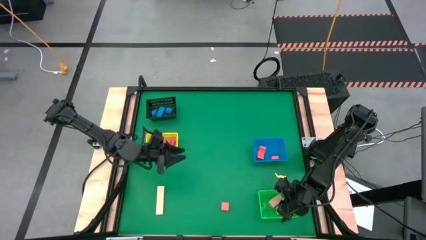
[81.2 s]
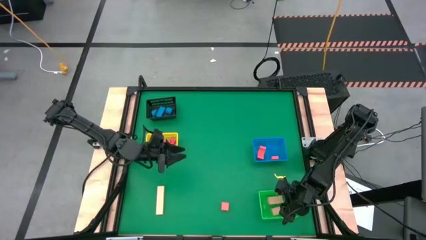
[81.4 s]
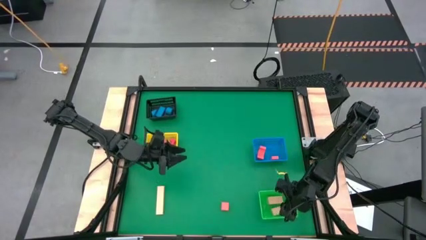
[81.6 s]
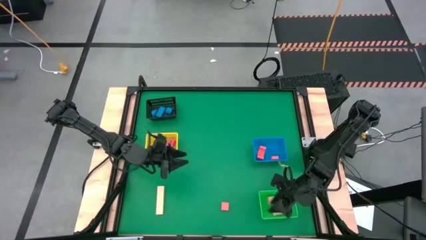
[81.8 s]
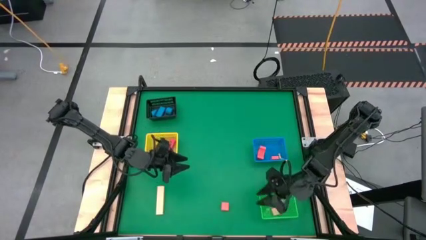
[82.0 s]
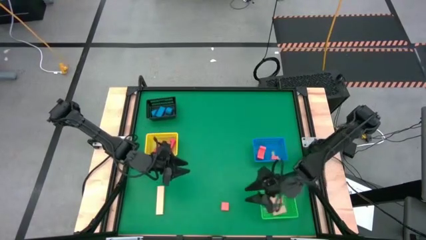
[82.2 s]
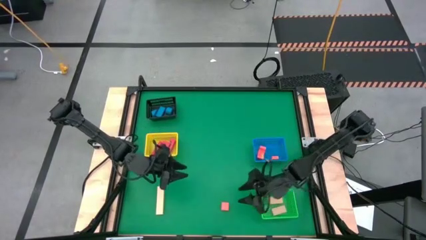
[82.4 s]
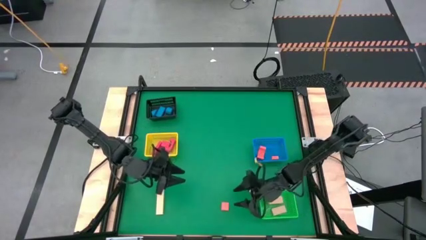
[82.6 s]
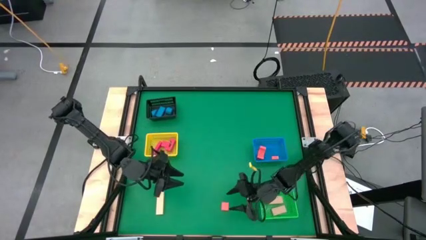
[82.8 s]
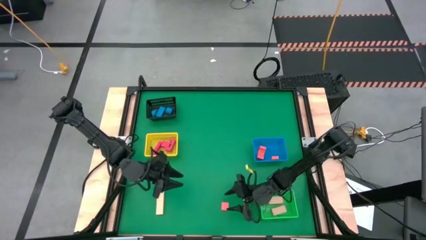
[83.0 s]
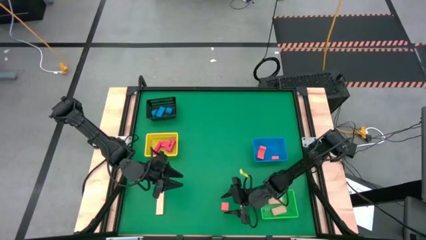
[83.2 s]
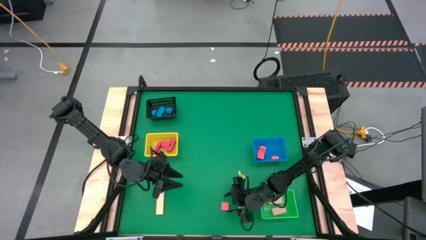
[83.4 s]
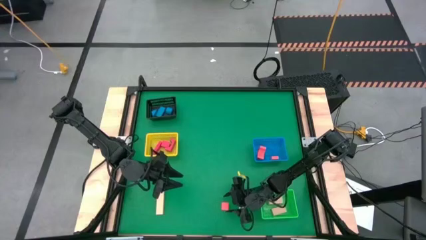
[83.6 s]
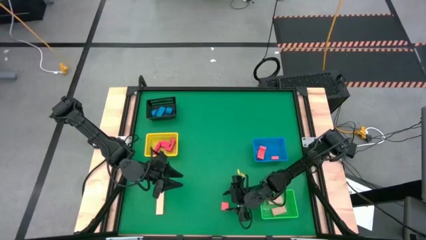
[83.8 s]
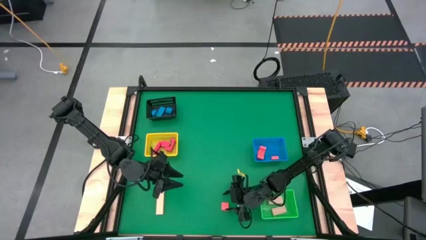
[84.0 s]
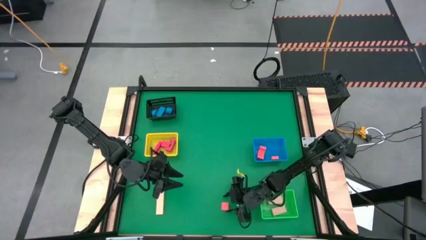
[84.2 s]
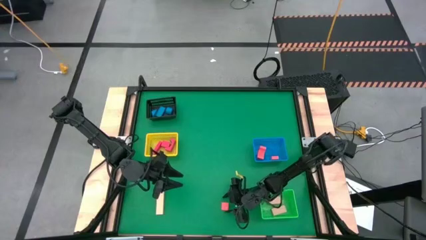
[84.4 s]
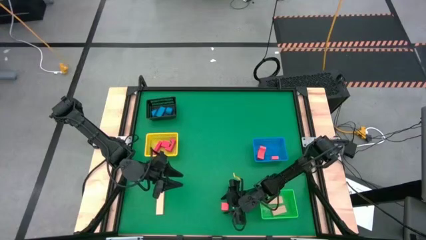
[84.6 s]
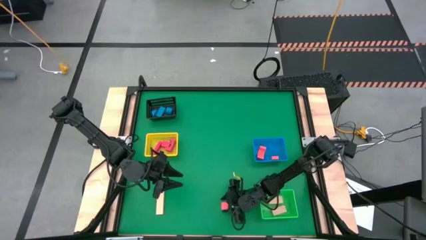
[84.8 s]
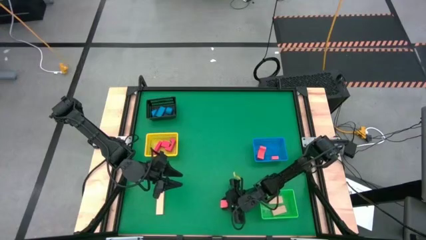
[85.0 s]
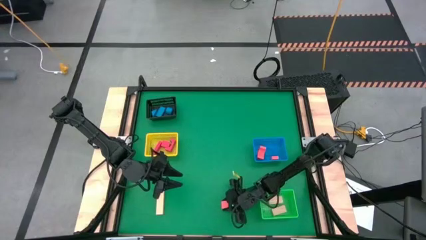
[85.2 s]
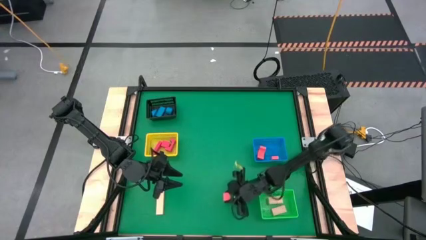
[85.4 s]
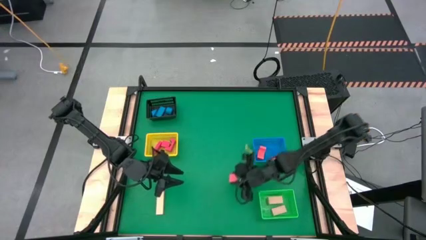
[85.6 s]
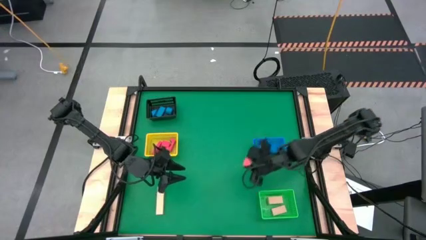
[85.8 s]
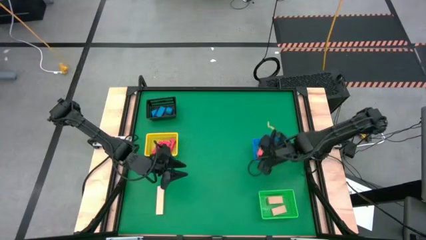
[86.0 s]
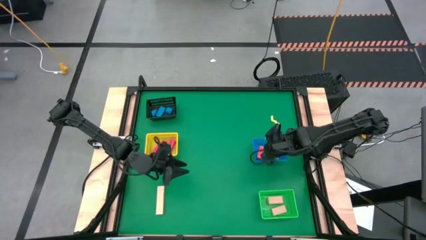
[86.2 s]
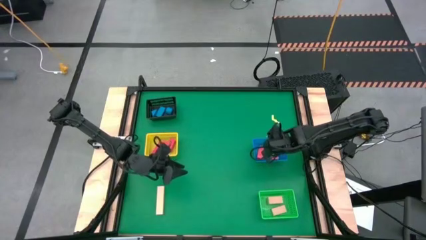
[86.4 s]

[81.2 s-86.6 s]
Task: Sort & place blocks by color
Put the orange block into the blue bin

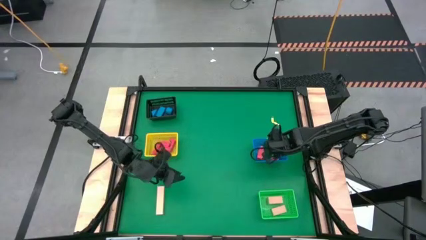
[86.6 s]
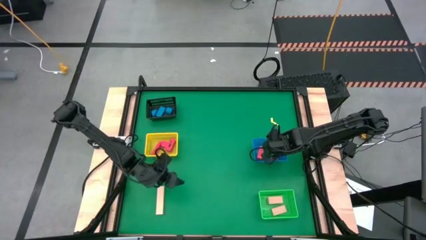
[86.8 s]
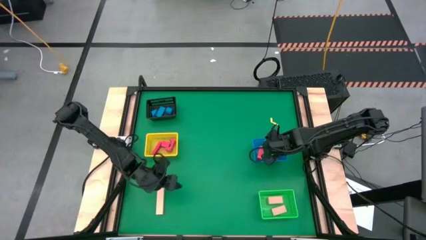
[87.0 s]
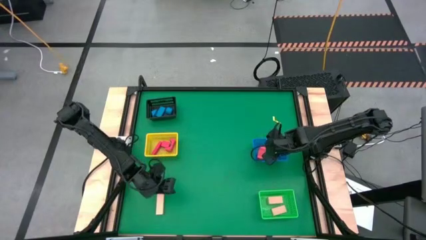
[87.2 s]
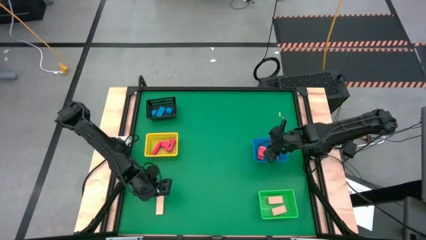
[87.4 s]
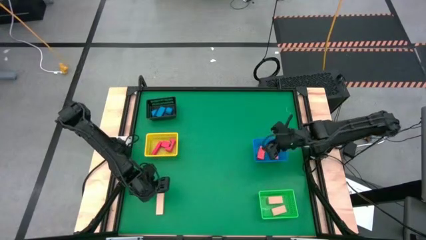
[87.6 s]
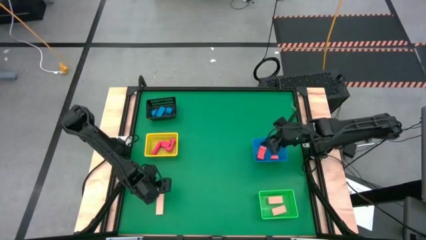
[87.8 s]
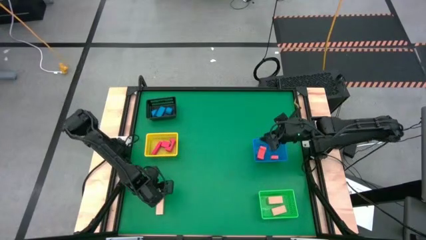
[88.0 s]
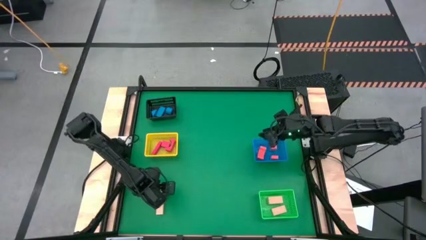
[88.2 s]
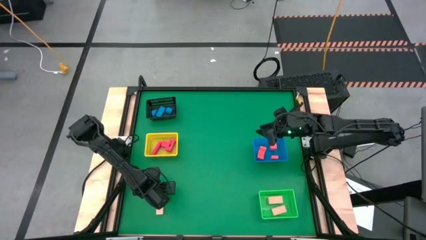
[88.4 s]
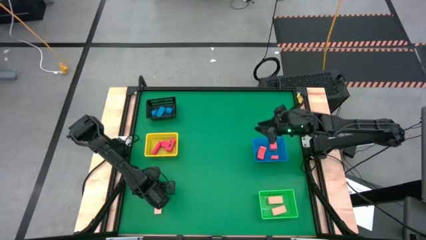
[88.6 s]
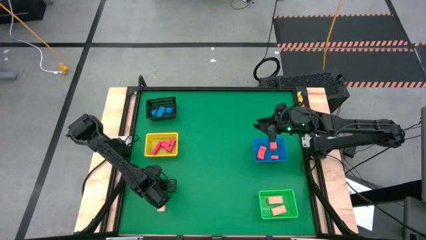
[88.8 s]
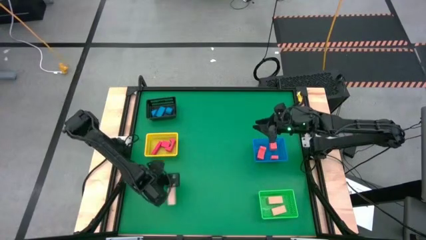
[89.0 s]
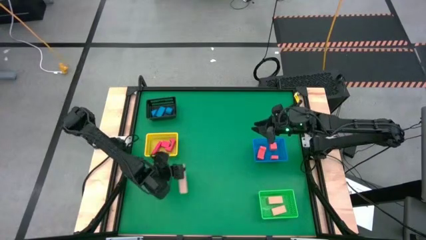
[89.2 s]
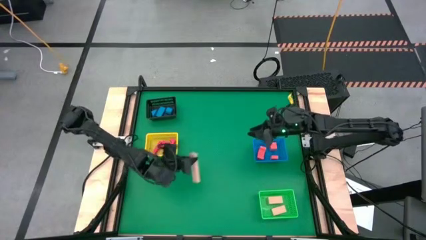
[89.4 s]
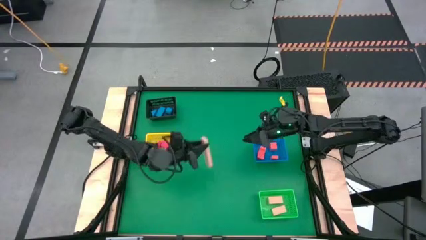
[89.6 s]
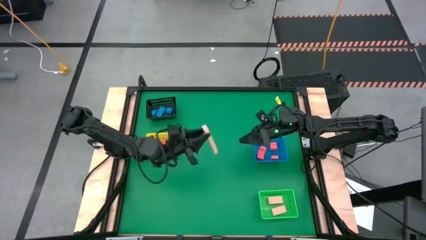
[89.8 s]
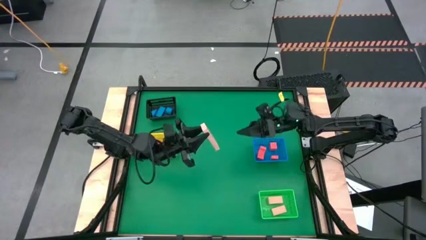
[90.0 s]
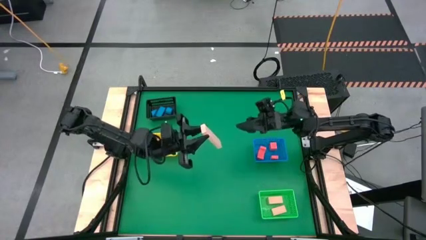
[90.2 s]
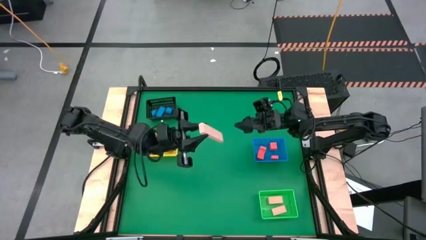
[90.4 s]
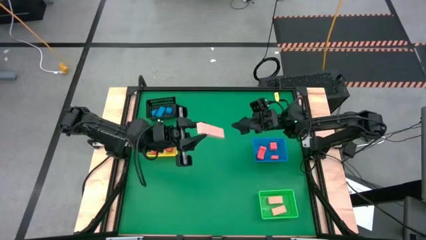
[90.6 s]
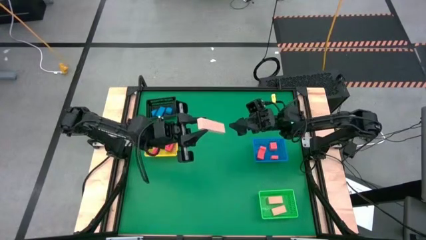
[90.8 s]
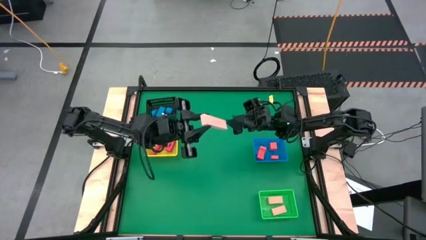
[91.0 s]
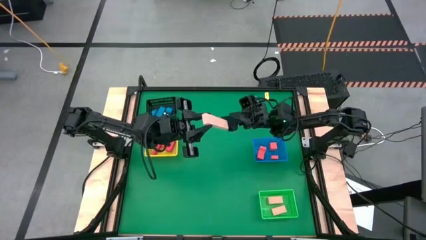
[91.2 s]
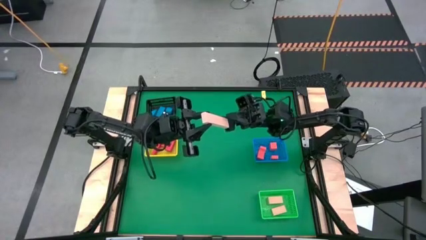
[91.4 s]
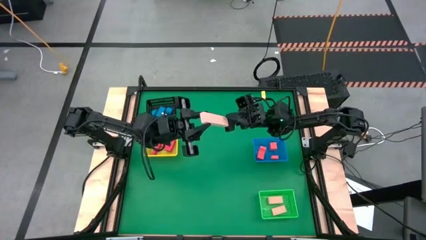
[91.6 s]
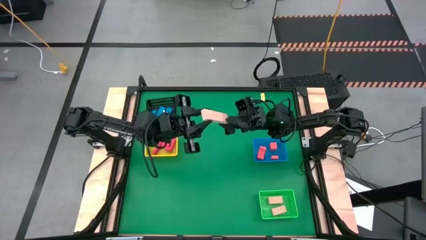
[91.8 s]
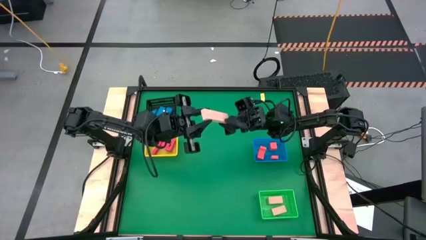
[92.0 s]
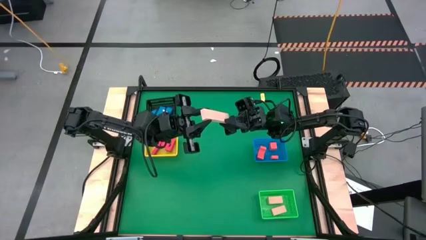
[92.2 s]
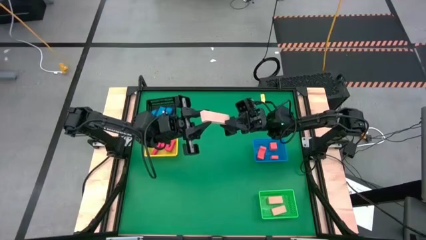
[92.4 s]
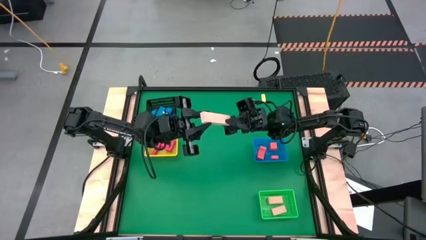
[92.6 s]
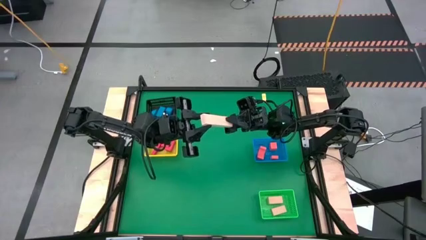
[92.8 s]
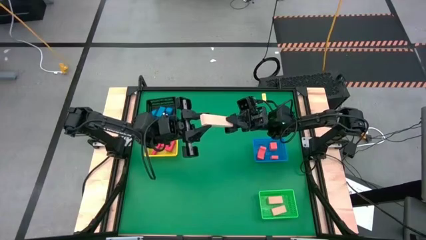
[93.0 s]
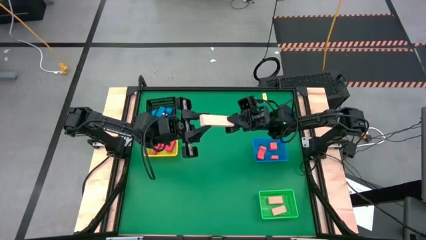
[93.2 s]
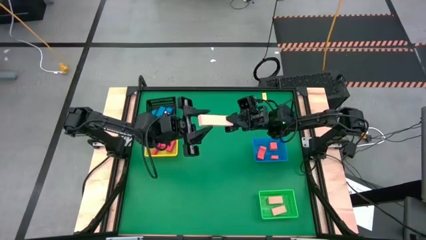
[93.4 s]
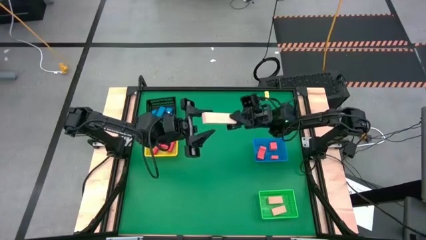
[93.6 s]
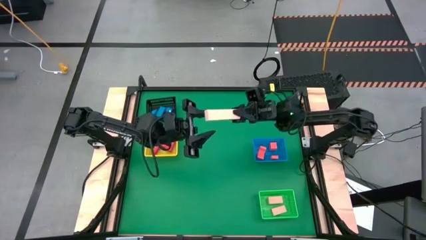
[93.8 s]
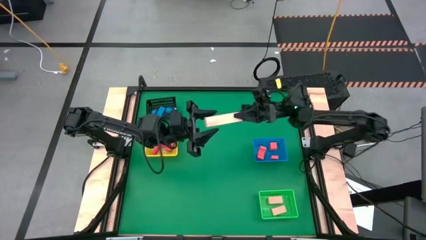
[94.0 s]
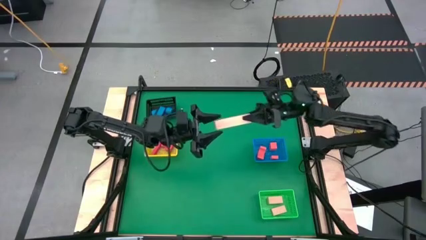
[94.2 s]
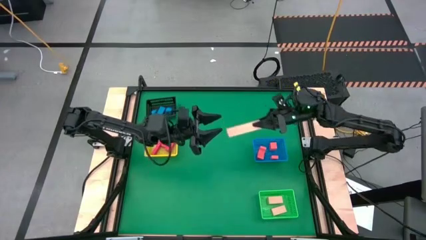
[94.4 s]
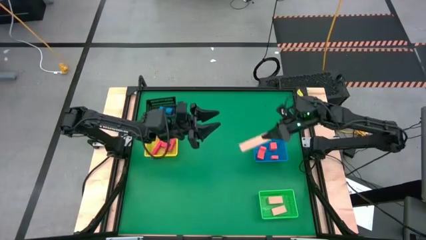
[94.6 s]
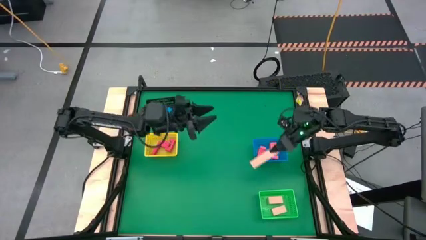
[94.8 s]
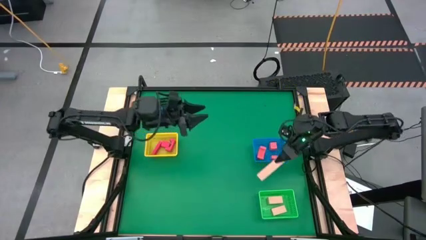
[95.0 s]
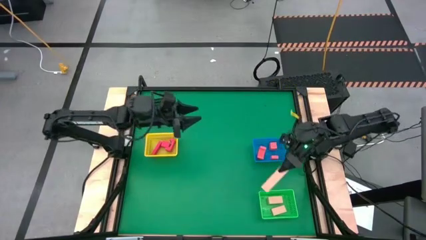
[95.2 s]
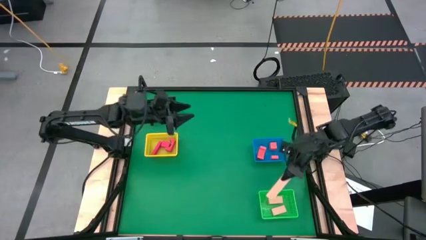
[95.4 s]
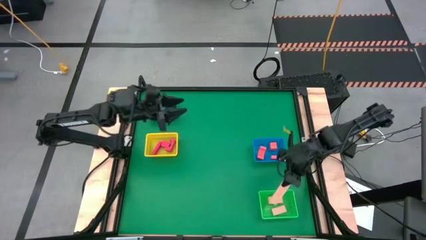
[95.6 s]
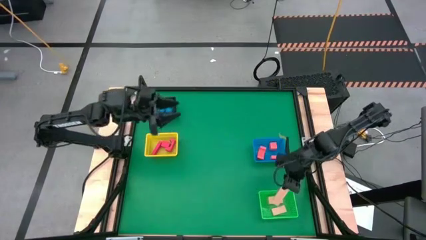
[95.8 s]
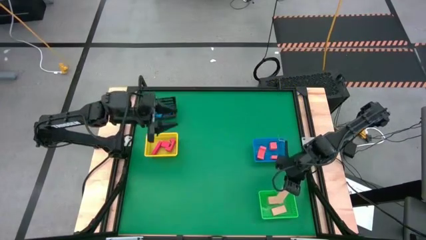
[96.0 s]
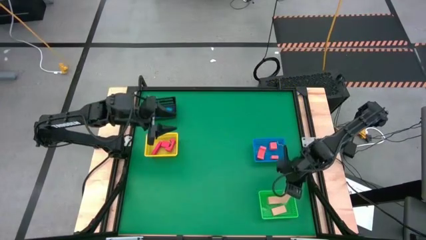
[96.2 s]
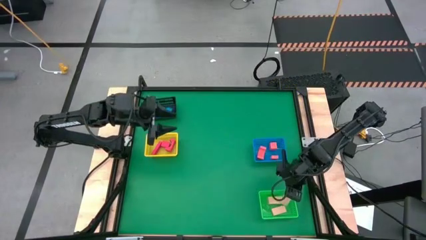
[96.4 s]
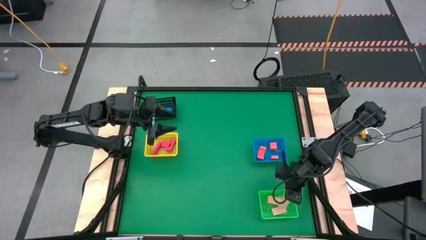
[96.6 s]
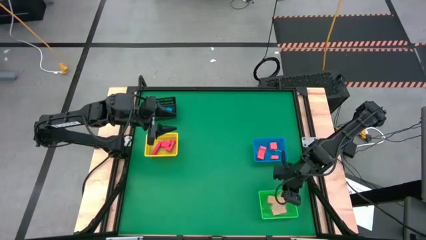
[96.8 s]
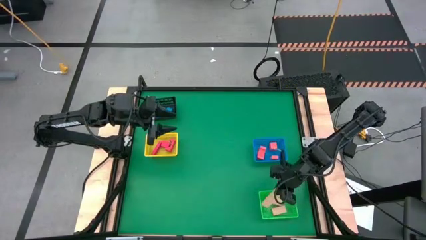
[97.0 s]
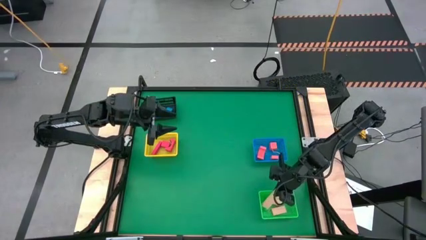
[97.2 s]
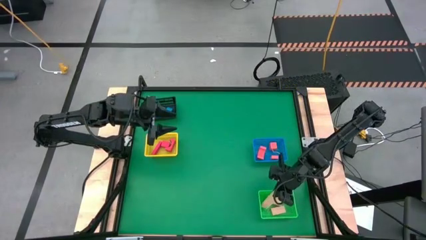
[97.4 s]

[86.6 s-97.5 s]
Put the brown block into the green bin
